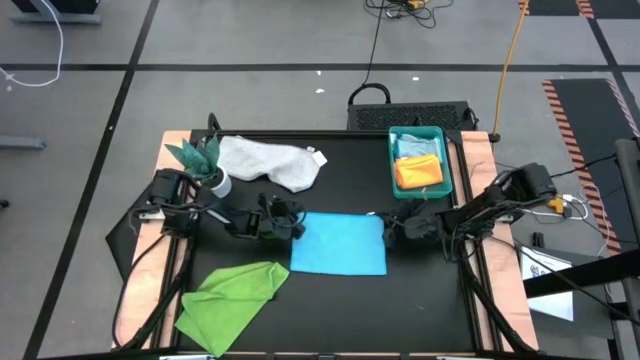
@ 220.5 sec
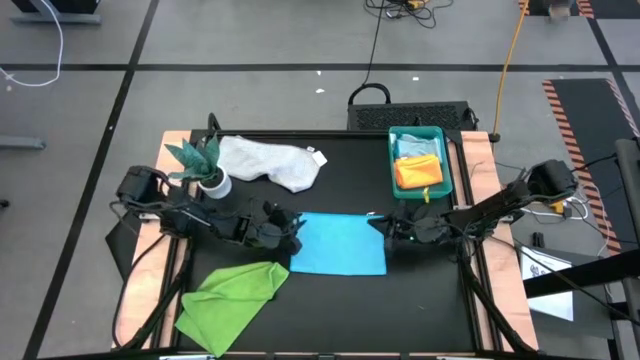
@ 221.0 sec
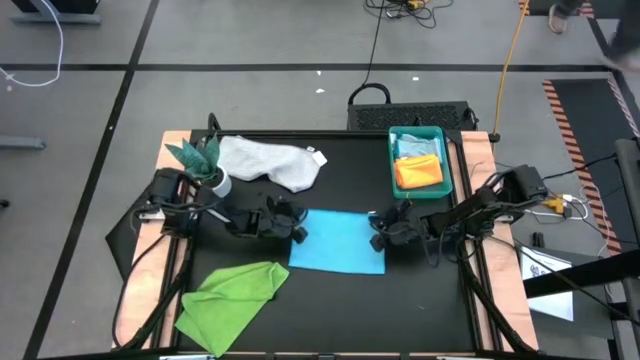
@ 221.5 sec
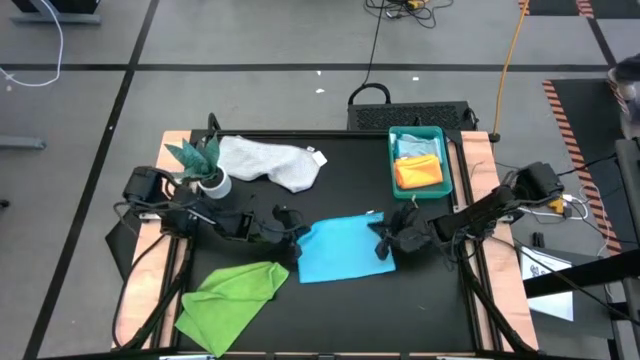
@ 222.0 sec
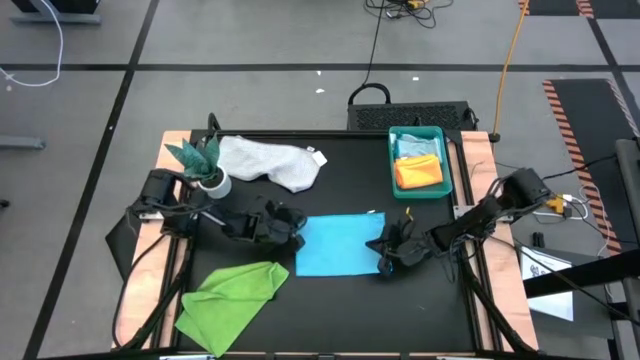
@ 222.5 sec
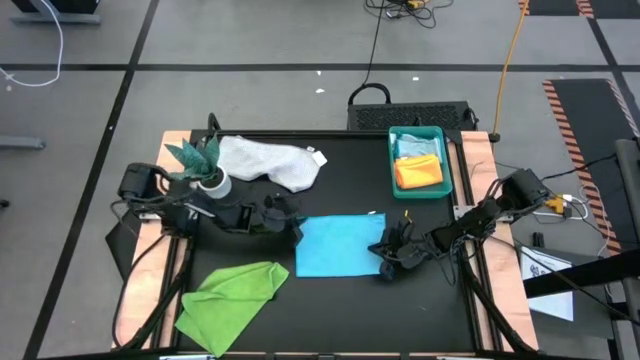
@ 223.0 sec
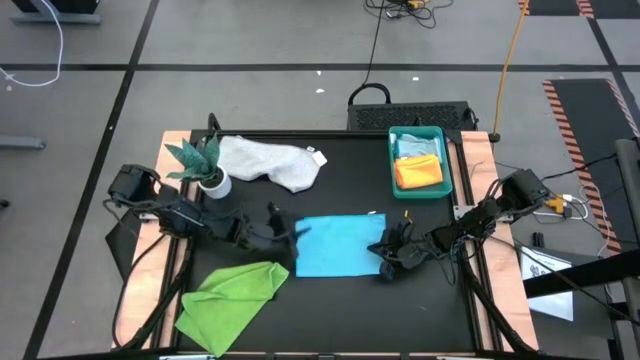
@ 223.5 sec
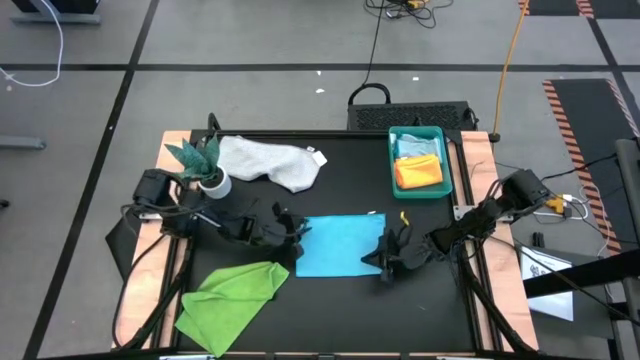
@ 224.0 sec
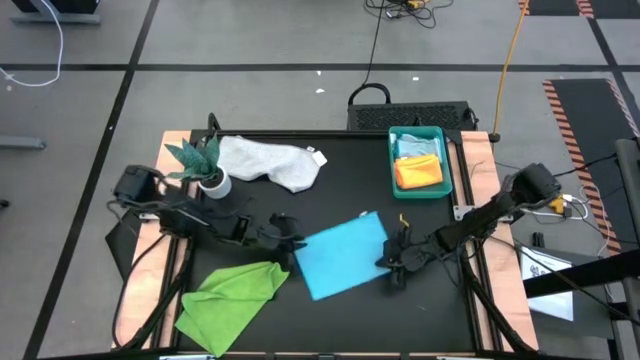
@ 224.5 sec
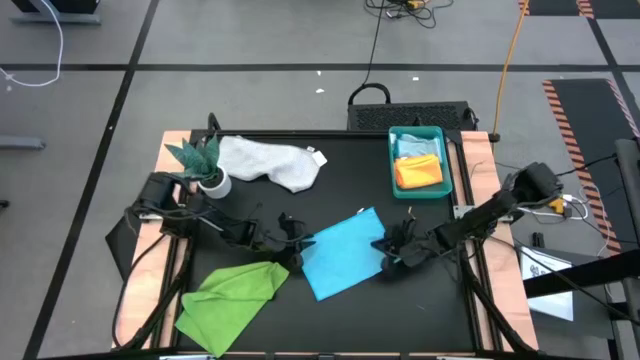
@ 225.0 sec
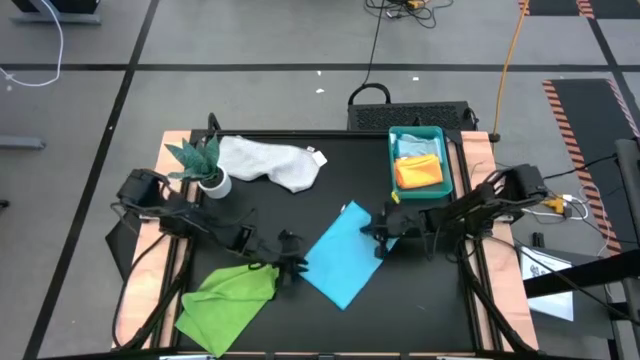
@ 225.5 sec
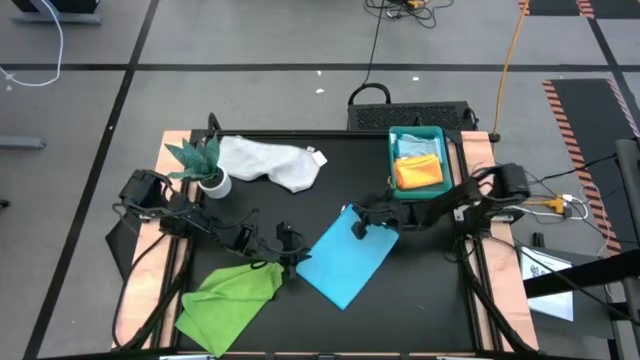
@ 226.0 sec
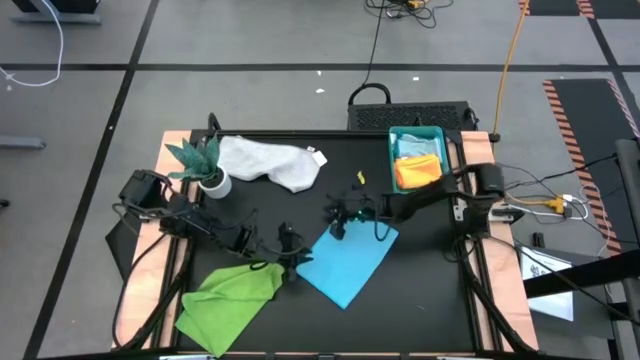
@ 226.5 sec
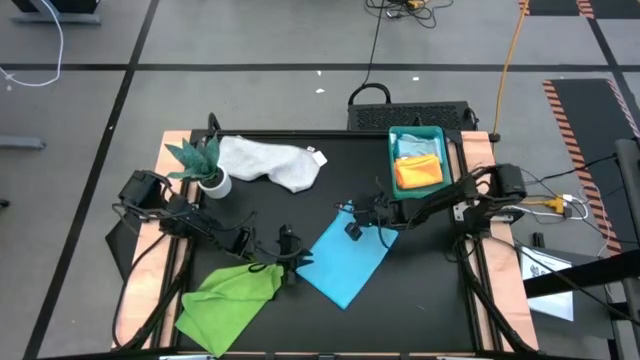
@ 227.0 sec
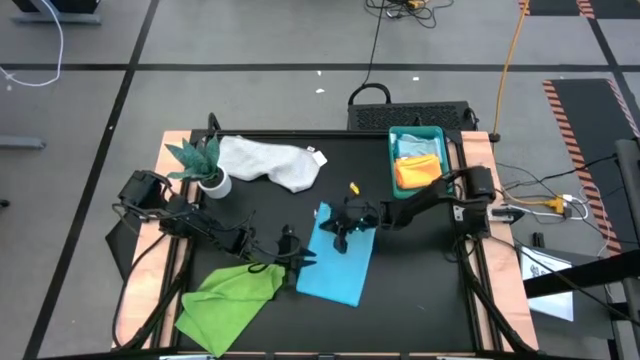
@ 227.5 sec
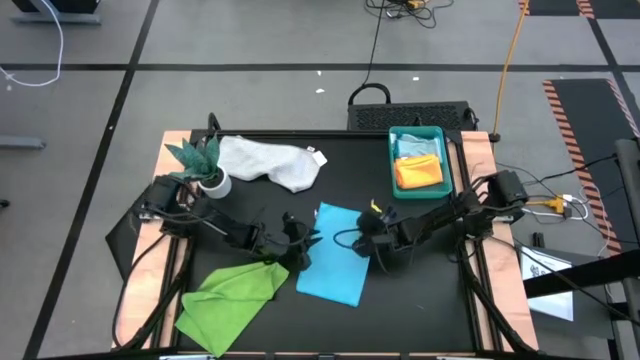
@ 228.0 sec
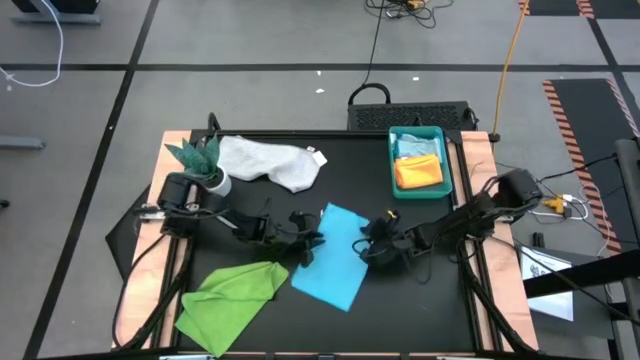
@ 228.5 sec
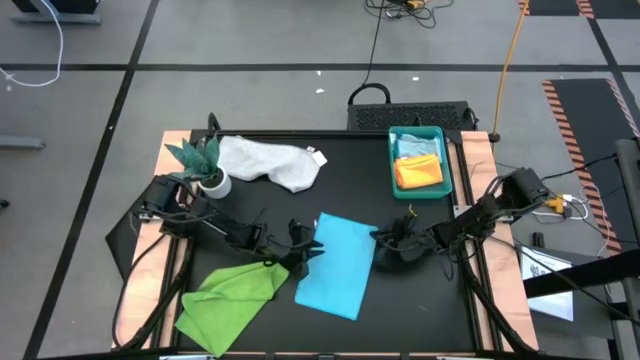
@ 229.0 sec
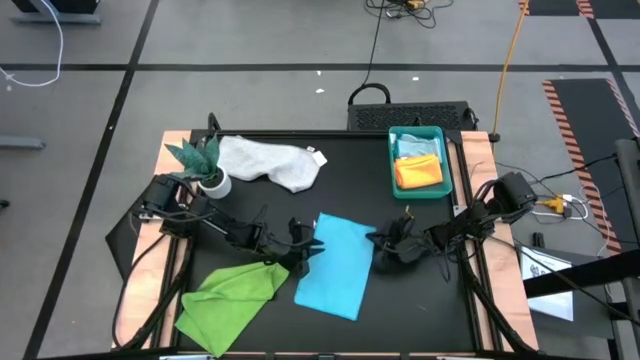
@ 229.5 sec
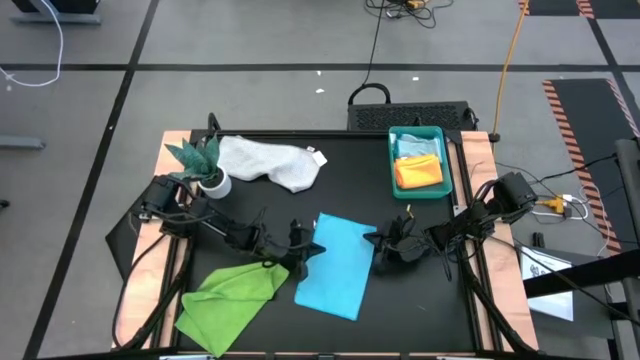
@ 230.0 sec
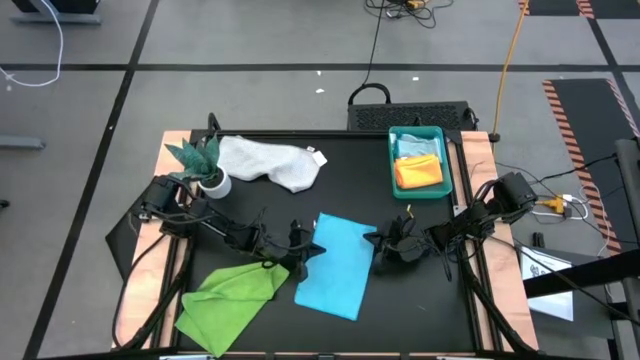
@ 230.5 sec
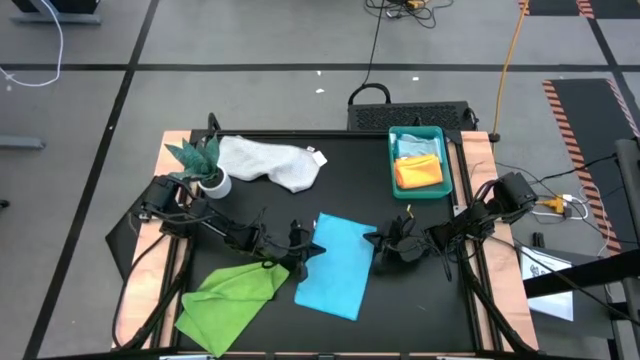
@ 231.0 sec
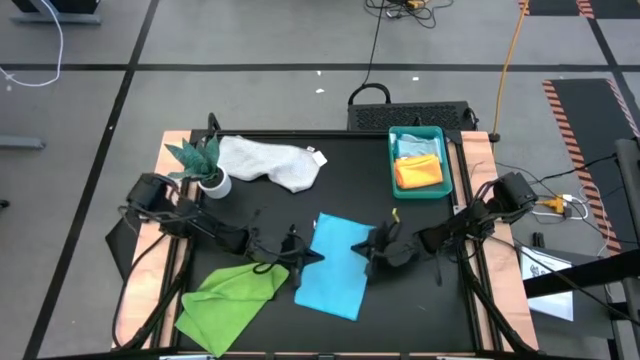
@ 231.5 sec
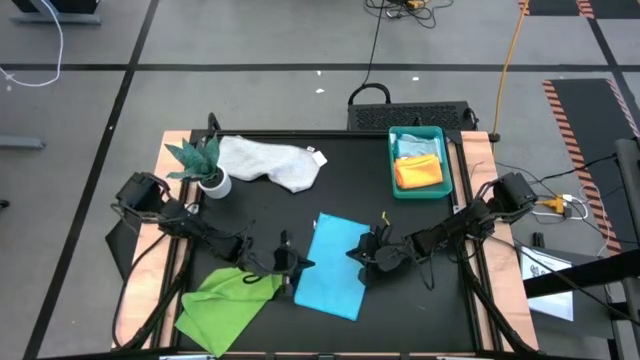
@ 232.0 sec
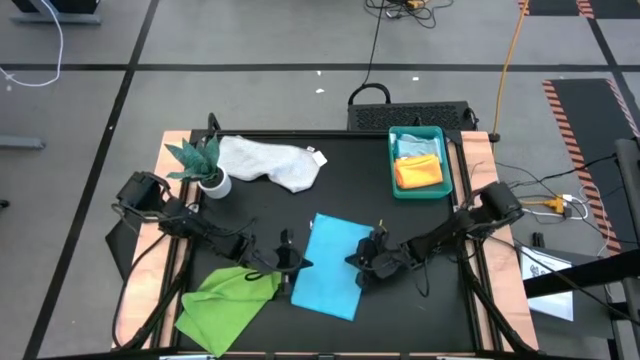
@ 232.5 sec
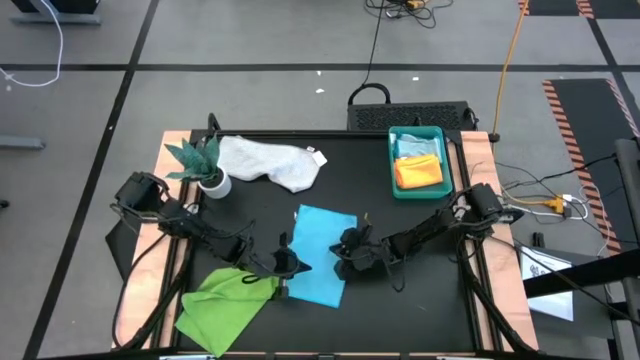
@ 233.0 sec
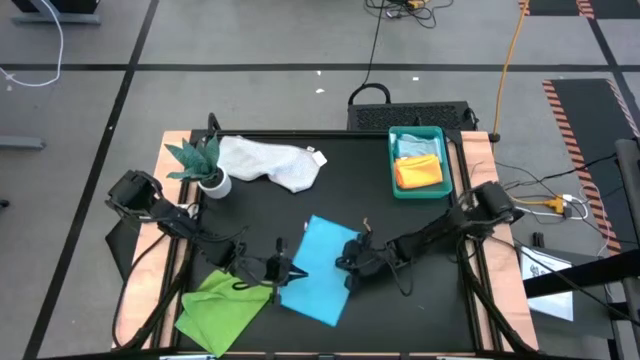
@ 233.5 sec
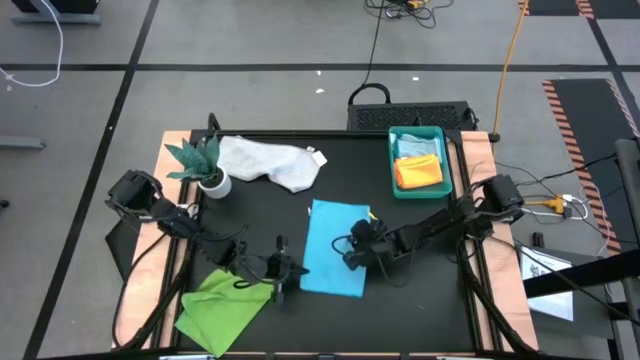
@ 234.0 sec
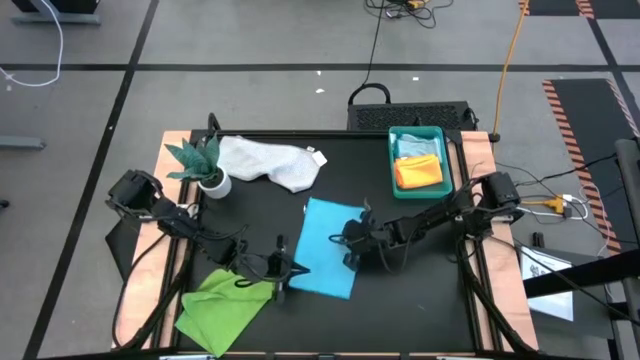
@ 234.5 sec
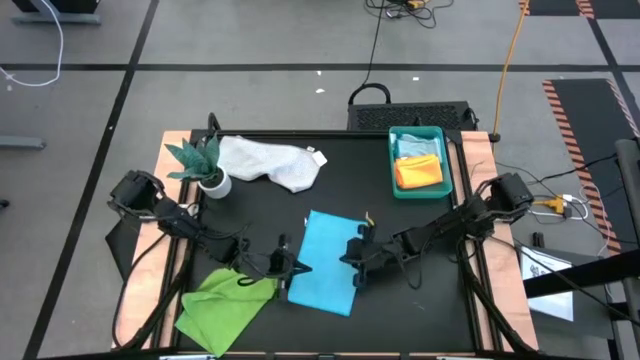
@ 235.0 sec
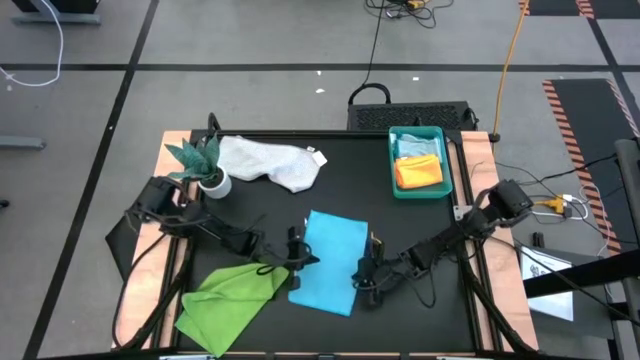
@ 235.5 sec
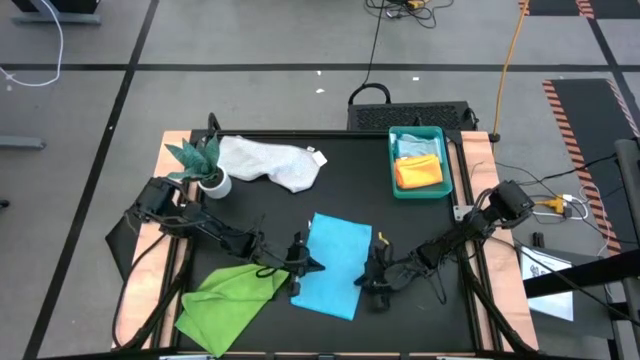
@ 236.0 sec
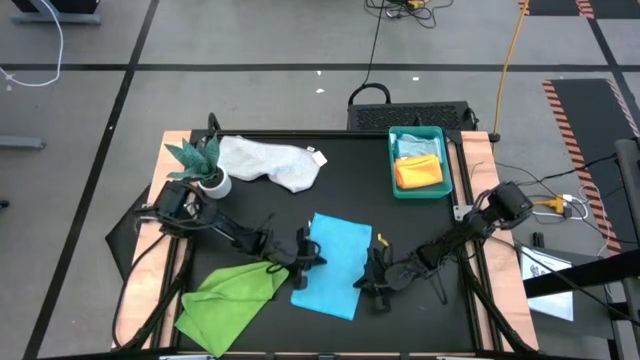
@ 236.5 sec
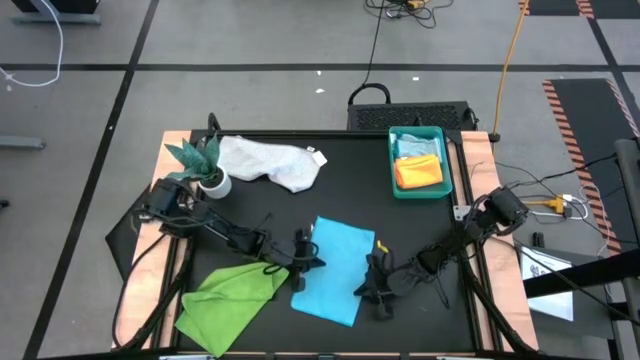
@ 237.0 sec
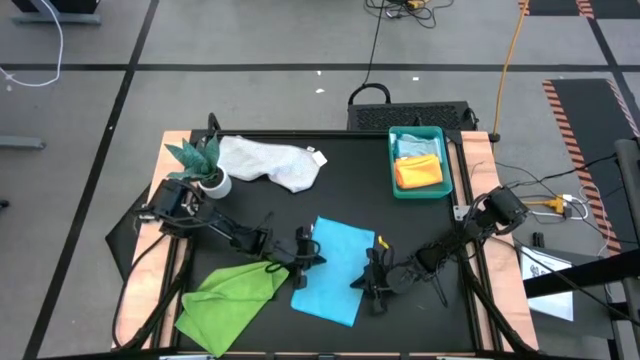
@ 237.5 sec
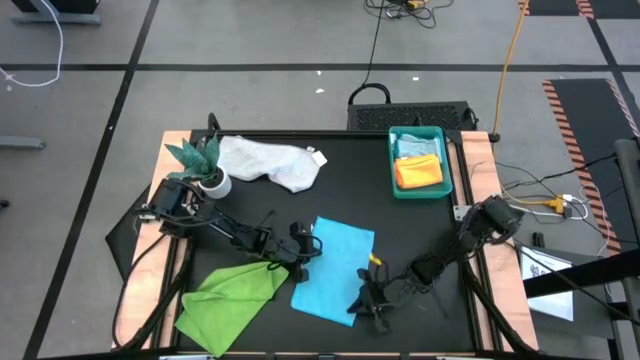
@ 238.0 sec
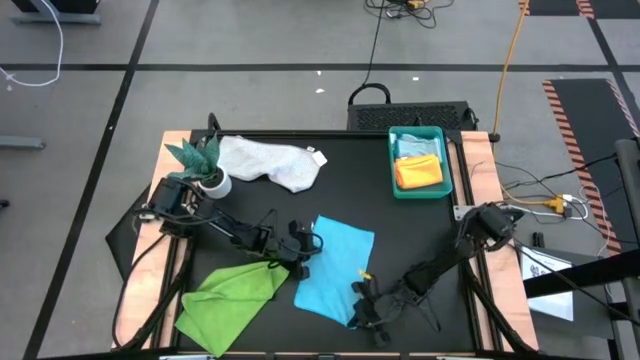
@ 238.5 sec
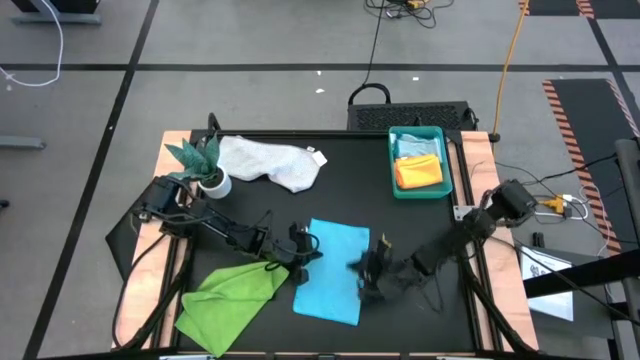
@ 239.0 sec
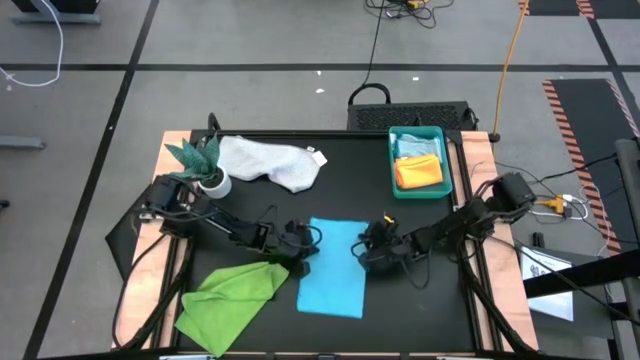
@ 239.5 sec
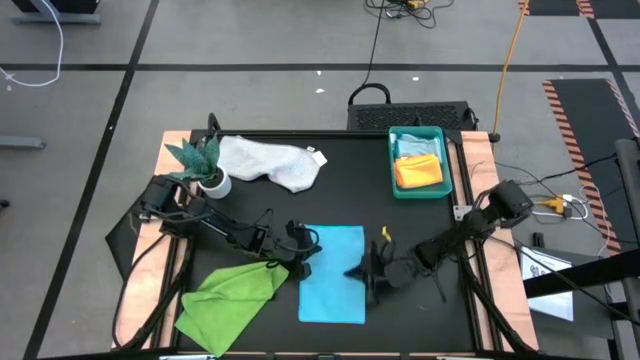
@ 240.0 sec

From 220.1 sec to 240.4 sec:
Task: Fold microfiber towels
Fold the blue microfiber cloth
